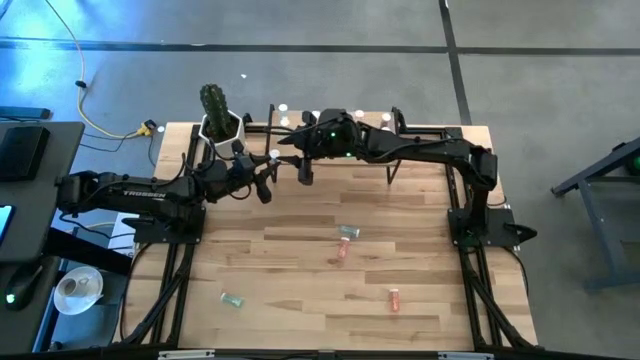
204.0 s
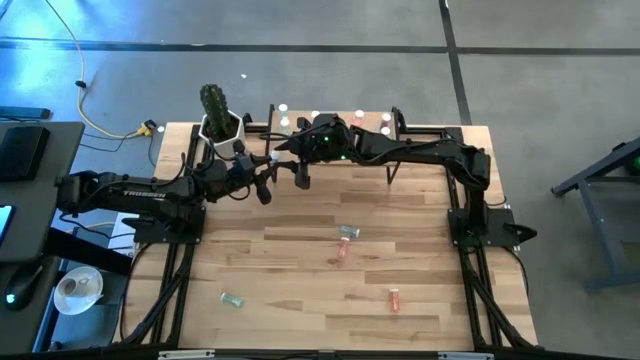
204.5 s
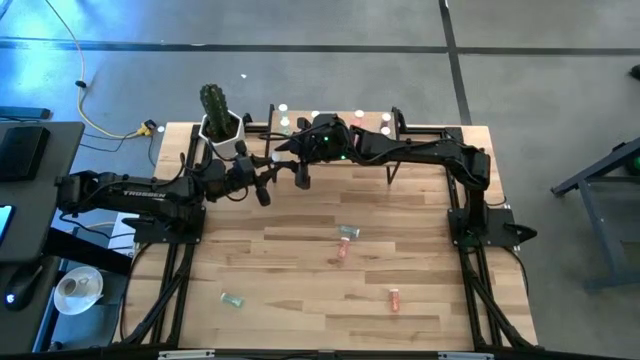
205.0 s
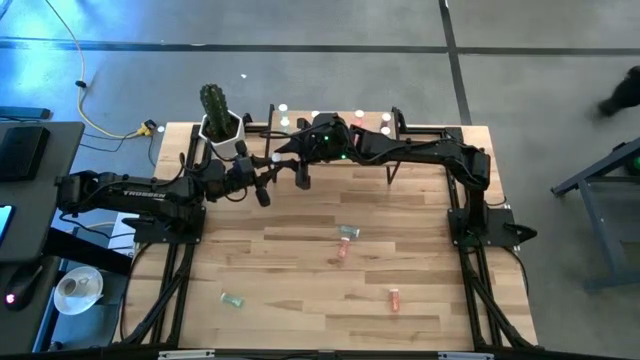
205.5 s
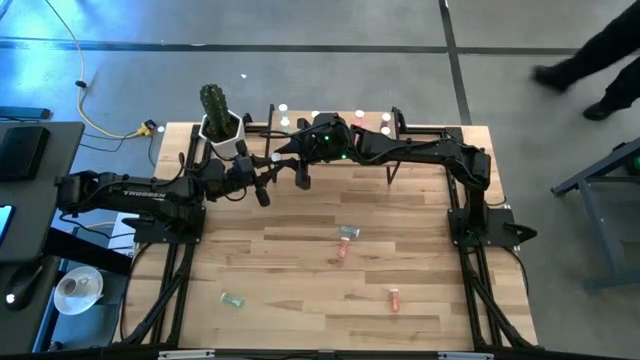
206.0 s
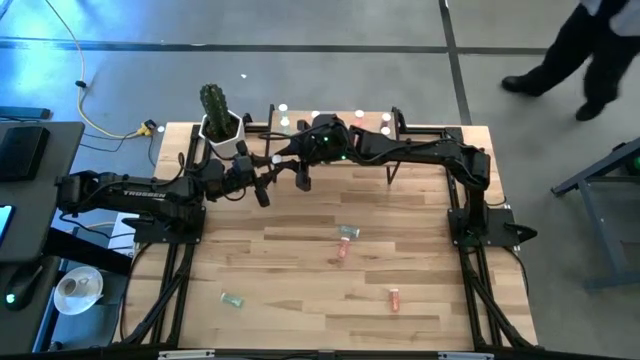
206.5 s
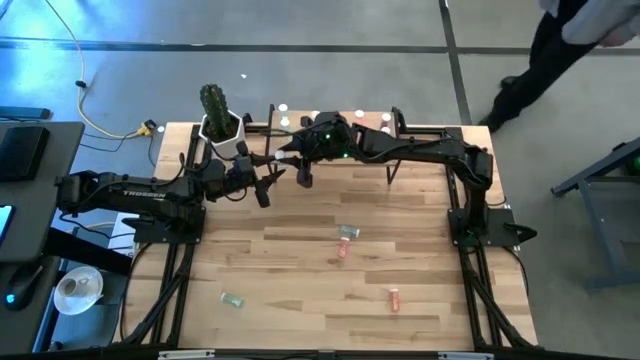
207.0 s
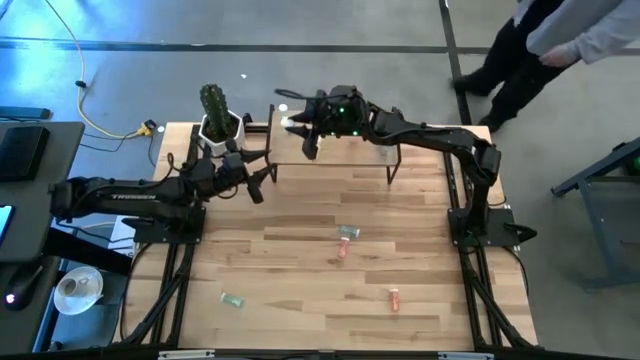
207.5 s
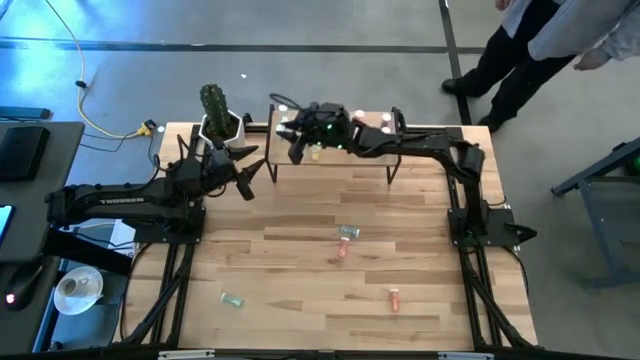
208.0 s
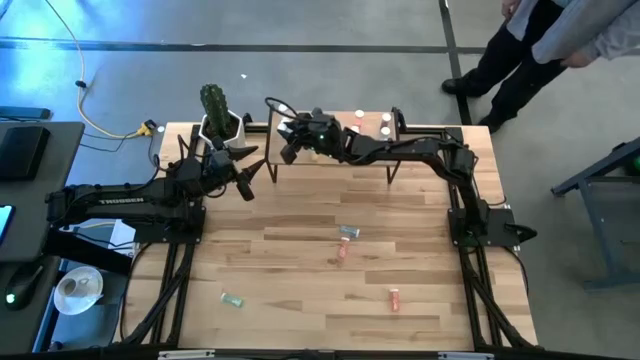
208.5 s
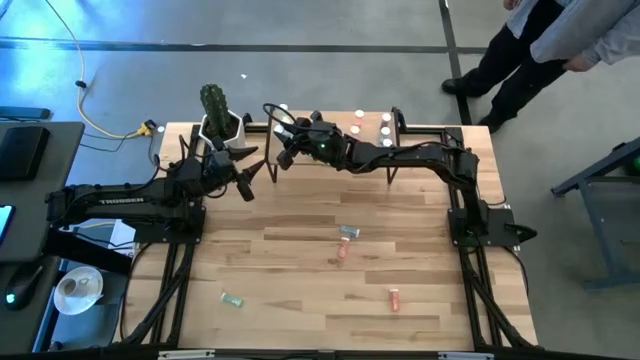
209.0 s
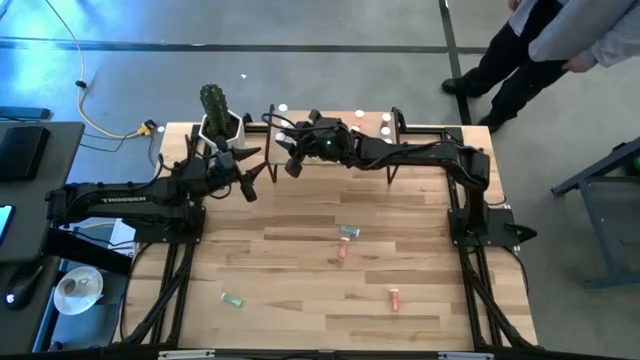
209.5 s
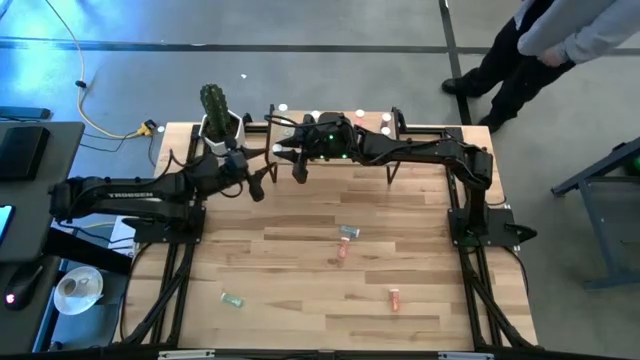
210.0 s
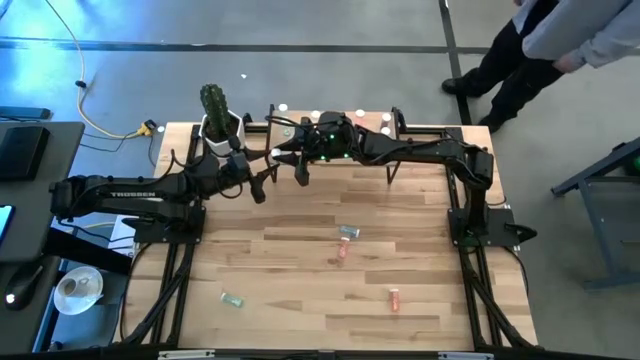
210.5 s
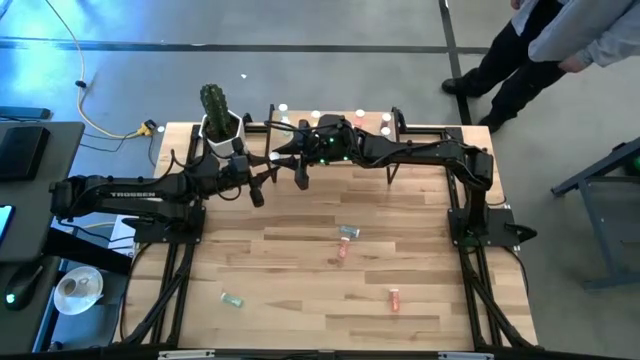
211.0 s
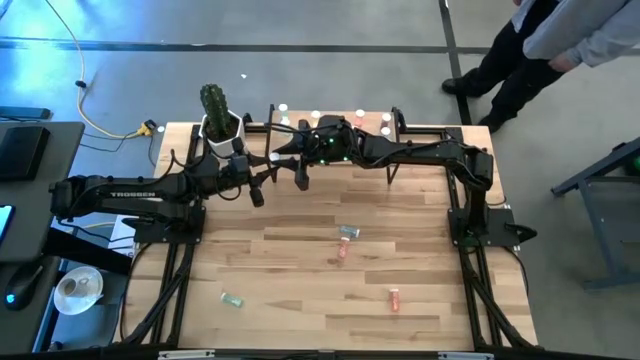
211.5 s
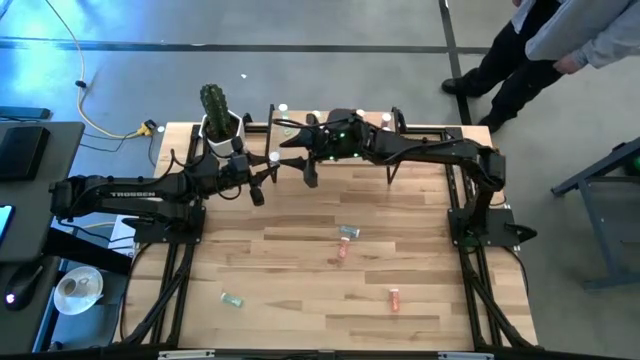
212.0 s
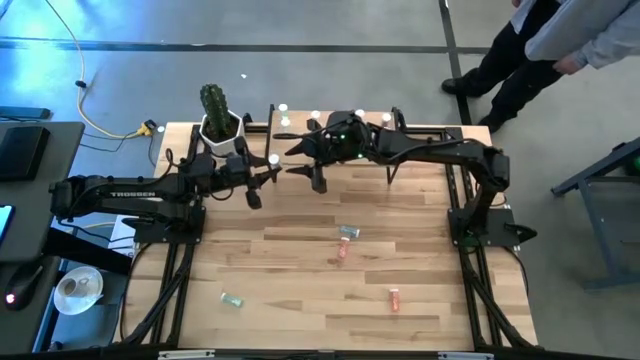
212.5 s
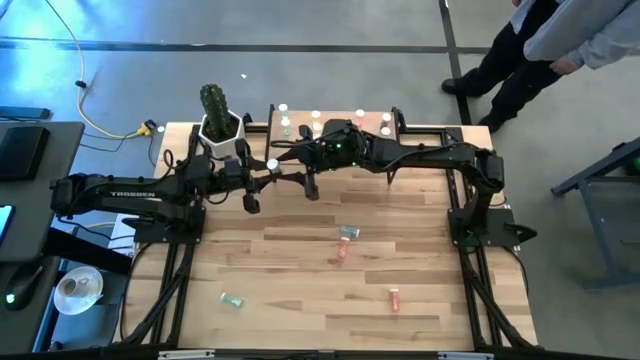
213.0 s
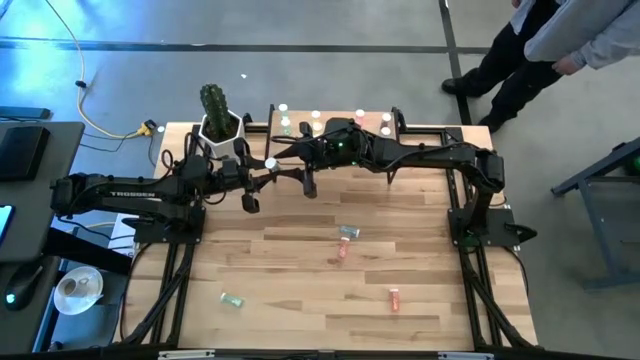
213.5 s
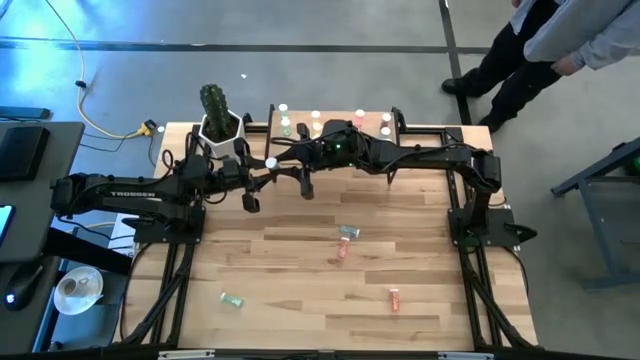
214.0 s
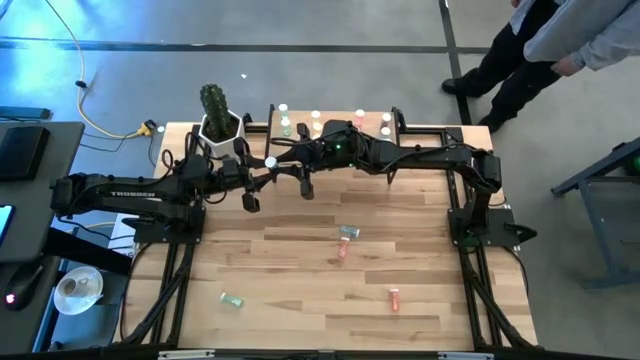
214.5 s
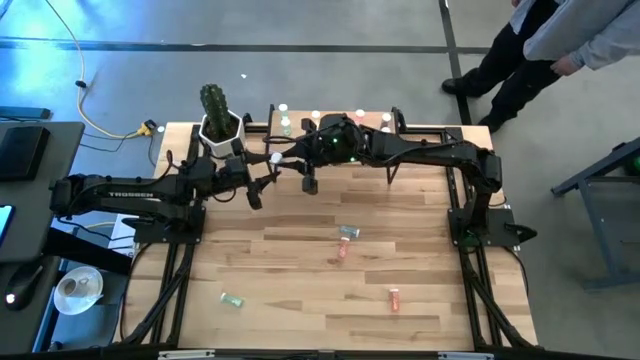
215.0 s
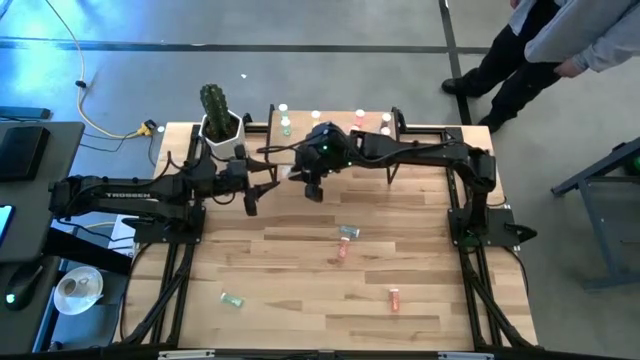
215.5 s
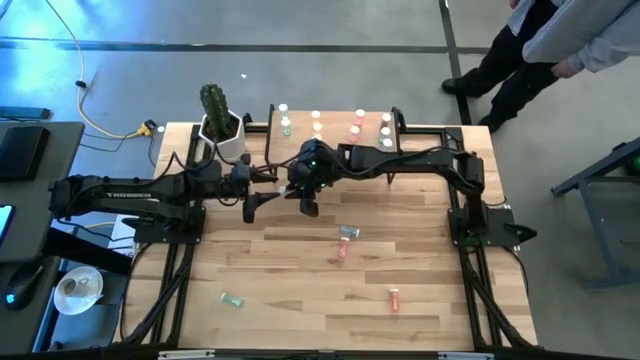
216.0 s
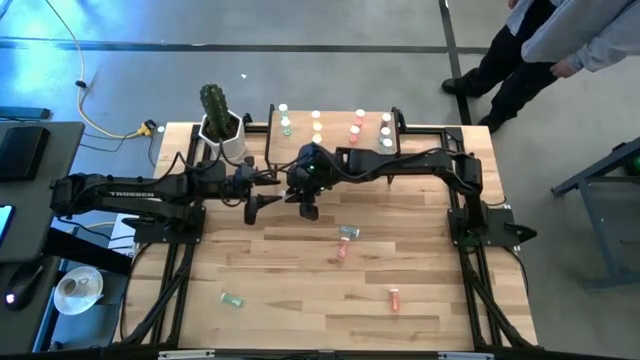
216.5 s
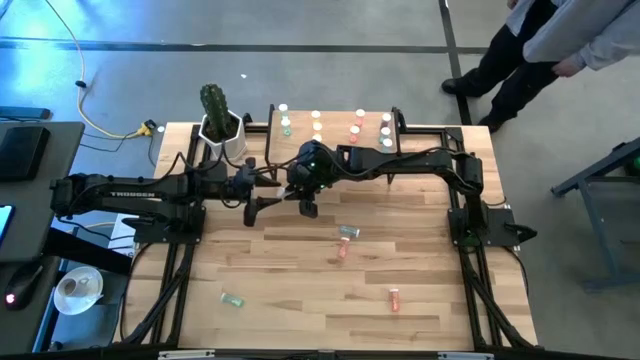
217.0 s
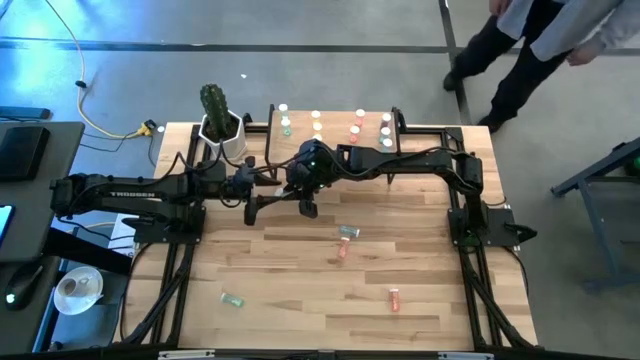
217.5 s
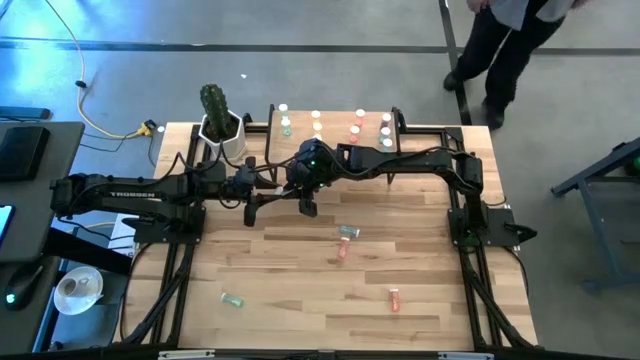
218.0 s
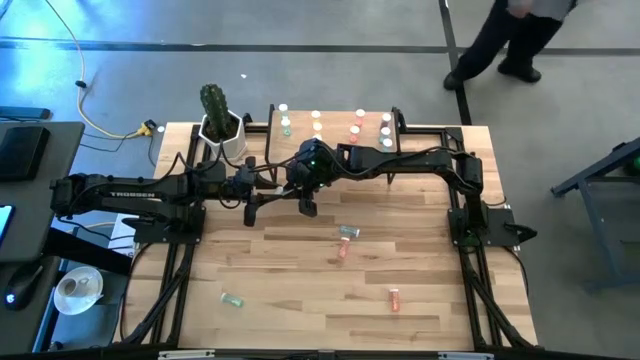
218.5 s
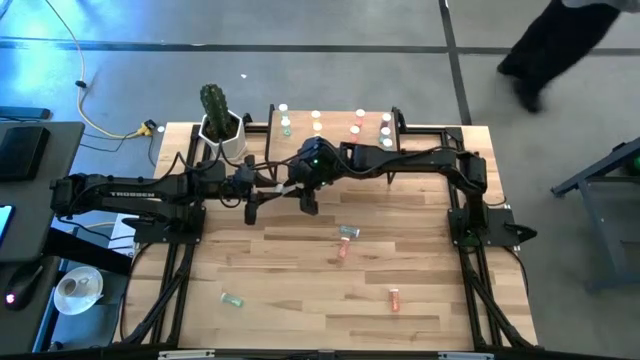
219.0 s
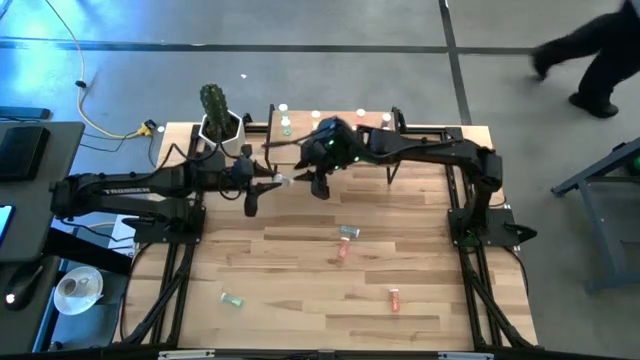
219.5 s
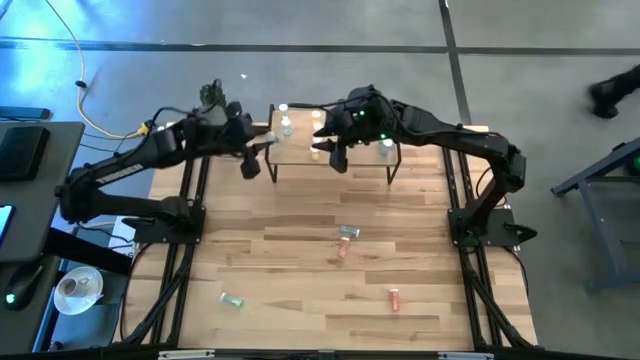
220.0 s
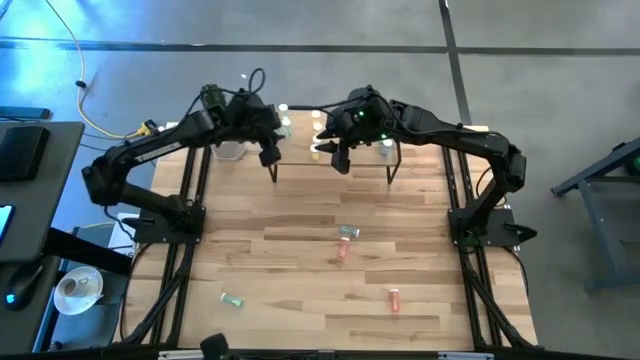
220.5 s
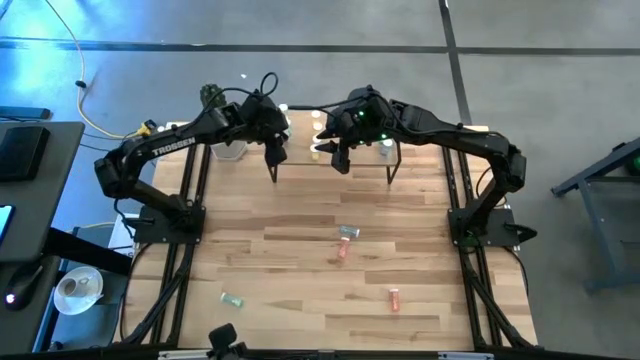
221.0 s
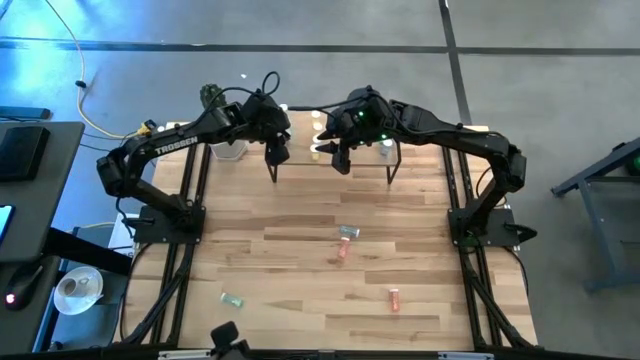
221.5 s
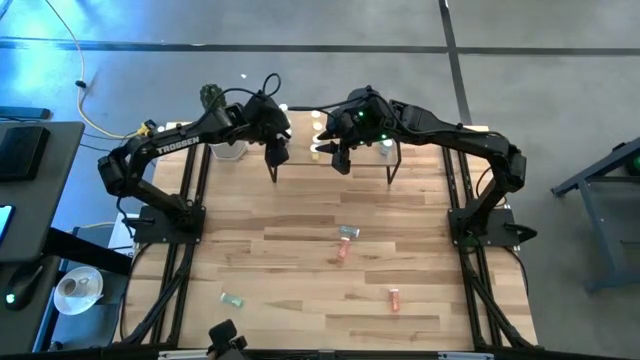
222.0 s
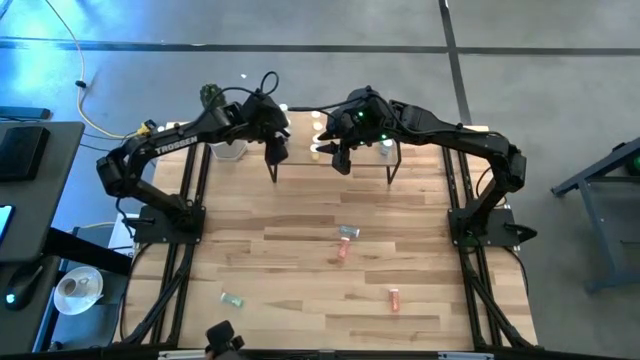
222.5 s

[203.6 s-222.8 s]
Task: Pick and place medicine bottles onto shelf by color
Put the light blue pill bottle on the shelf aligned with the other light blue pill bottle

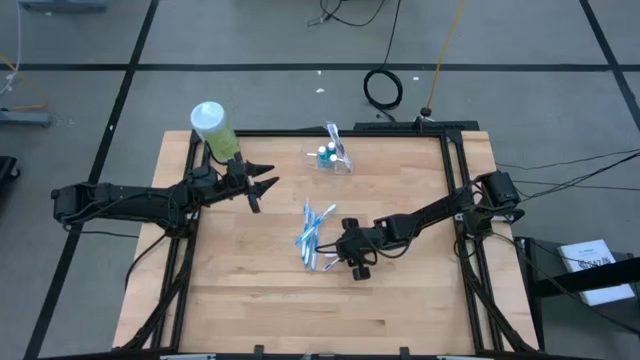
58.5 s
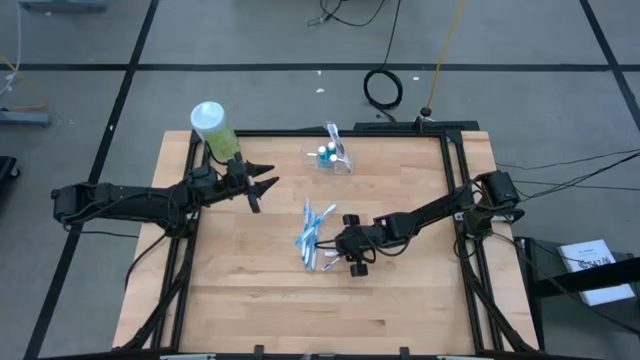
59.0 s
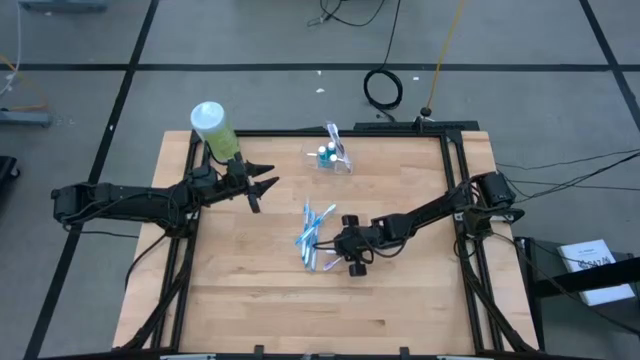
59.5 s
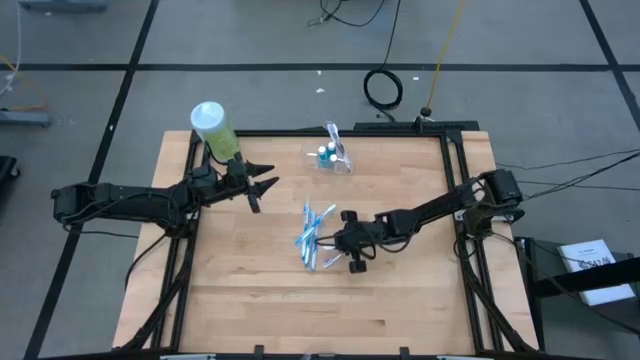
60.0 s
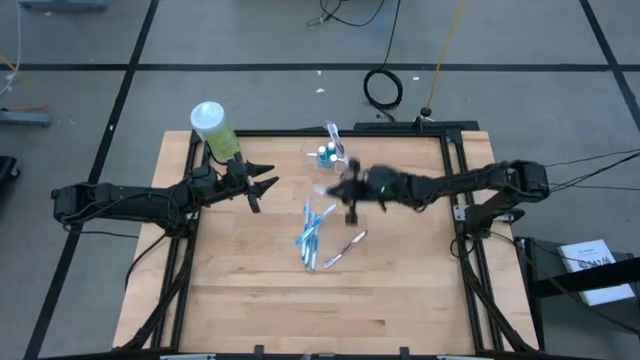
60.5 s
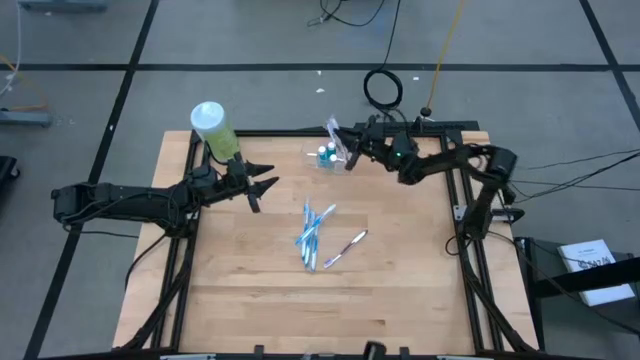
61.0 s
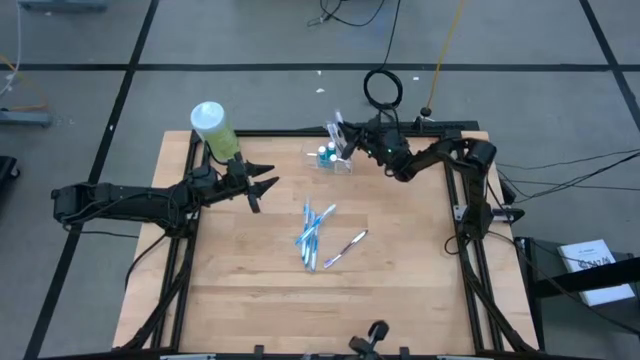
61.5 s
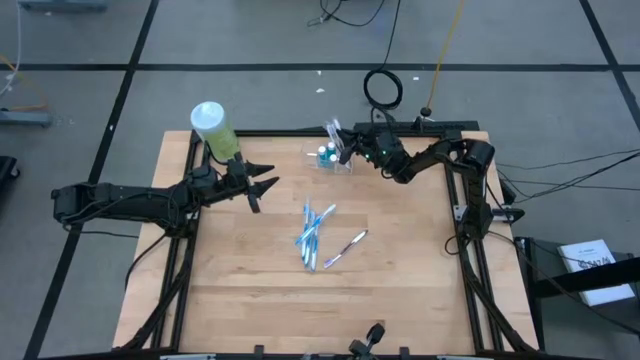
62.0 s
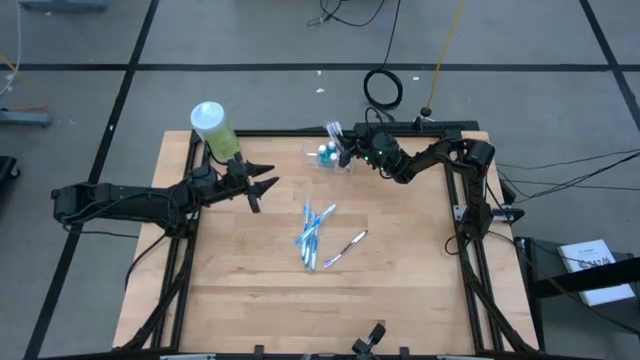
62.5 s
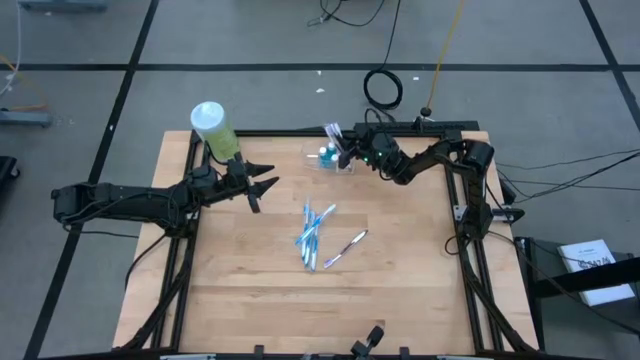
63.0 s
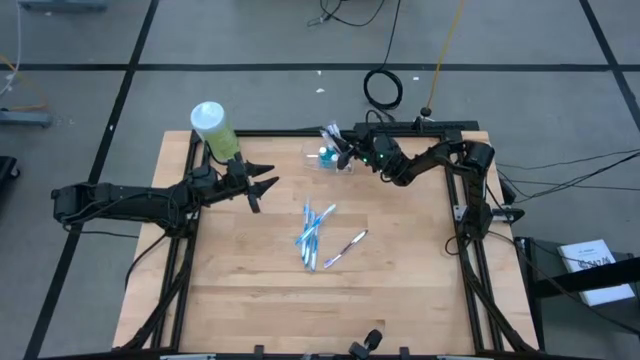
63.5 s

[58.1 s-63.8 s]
Task: Pick & Place toothbrushing station
Put the purple toothbrush into the transparent organizer
